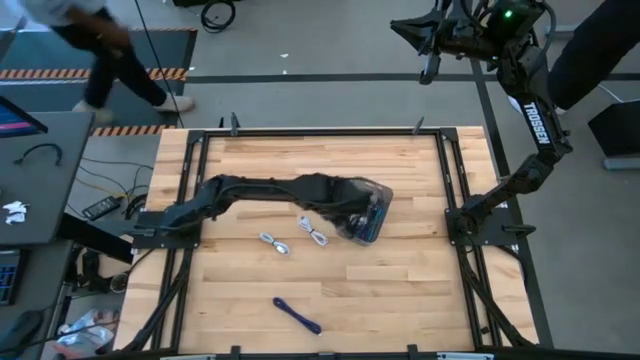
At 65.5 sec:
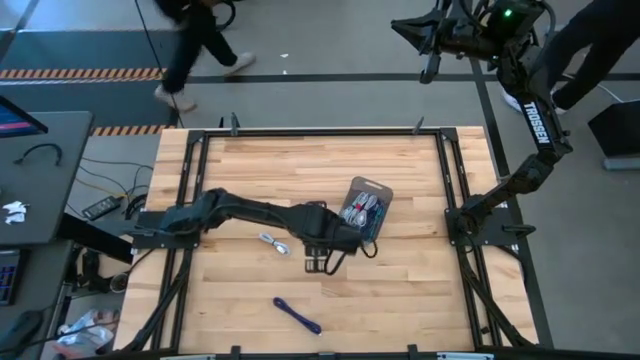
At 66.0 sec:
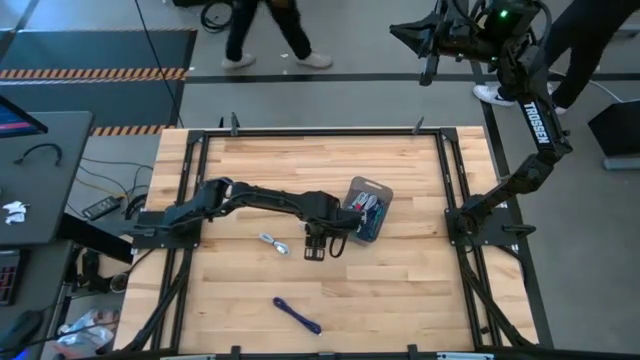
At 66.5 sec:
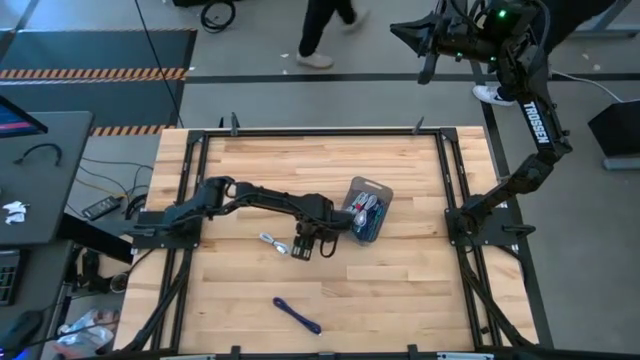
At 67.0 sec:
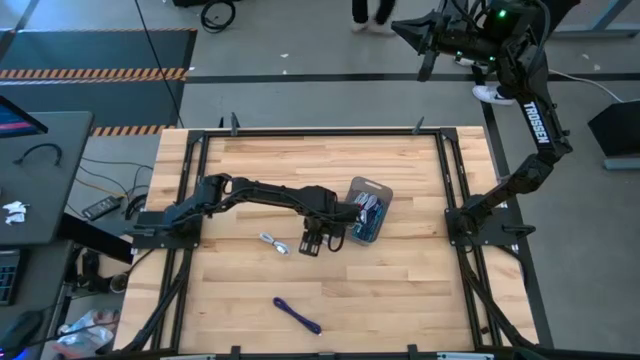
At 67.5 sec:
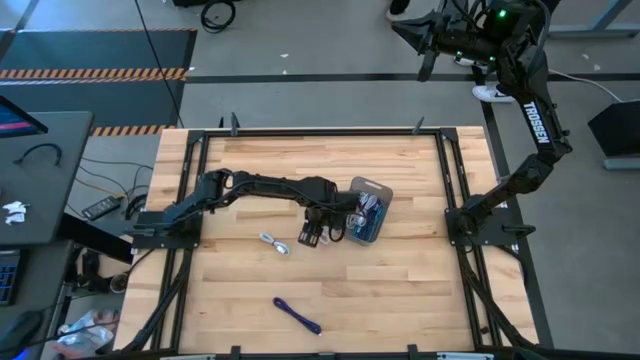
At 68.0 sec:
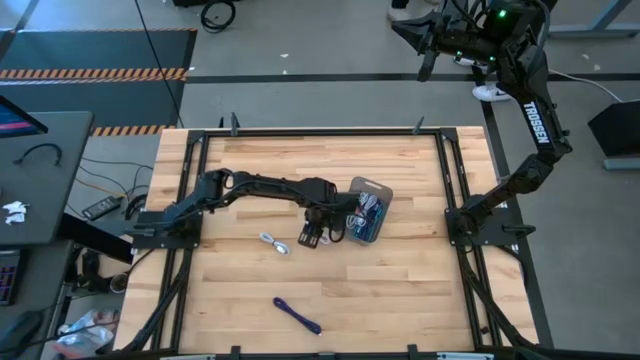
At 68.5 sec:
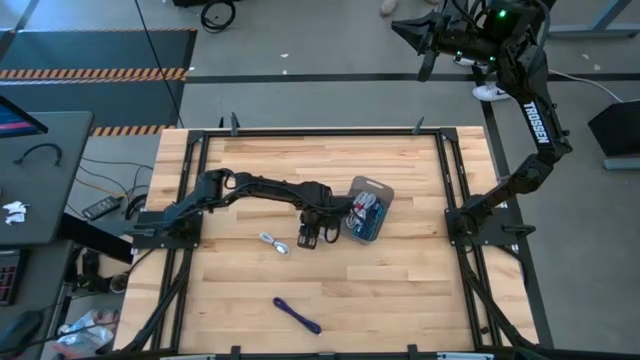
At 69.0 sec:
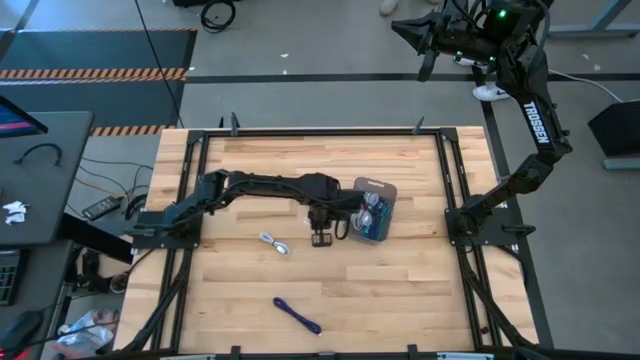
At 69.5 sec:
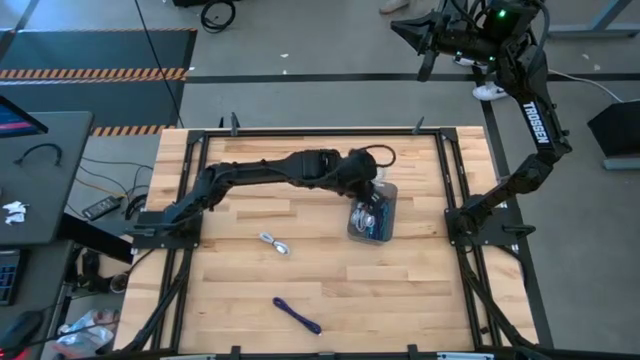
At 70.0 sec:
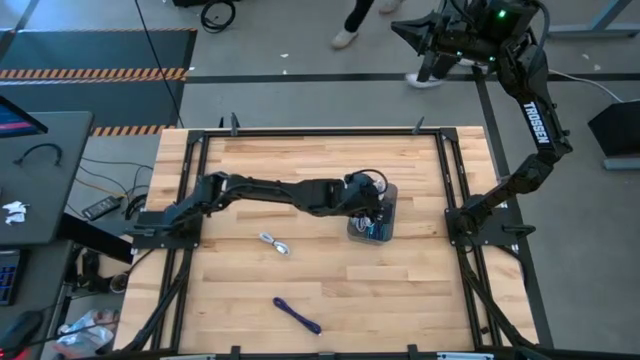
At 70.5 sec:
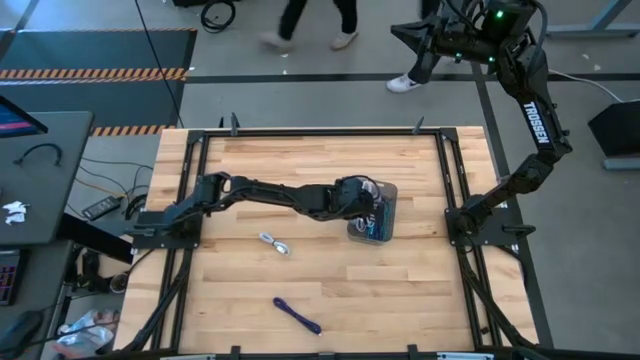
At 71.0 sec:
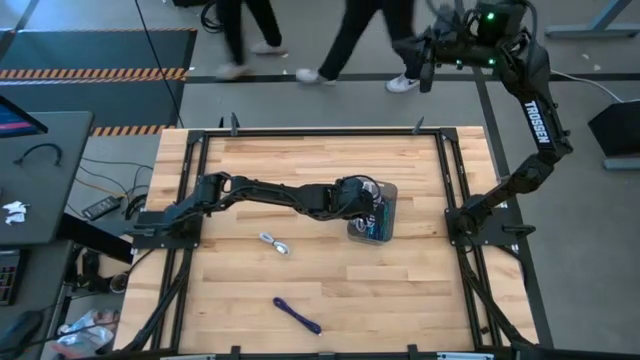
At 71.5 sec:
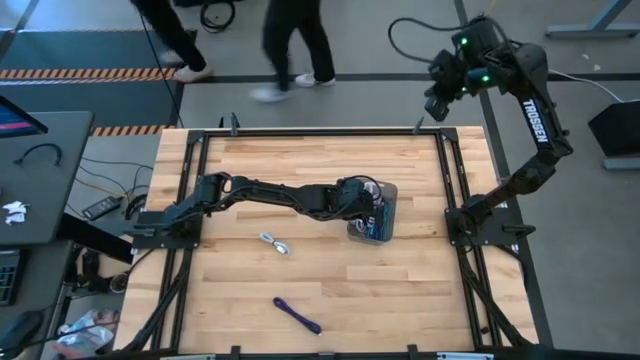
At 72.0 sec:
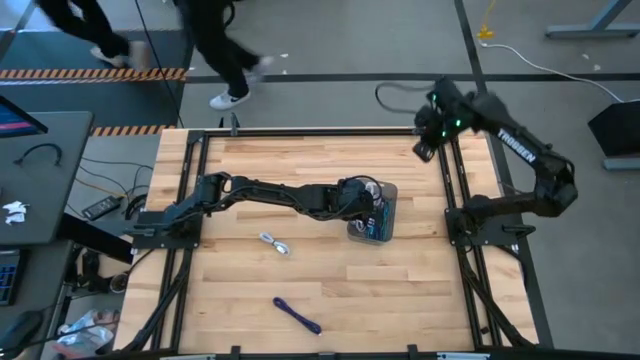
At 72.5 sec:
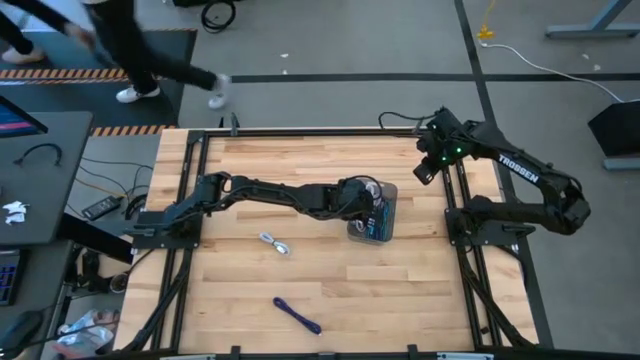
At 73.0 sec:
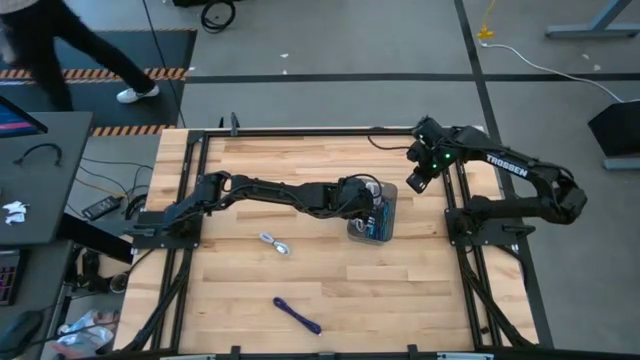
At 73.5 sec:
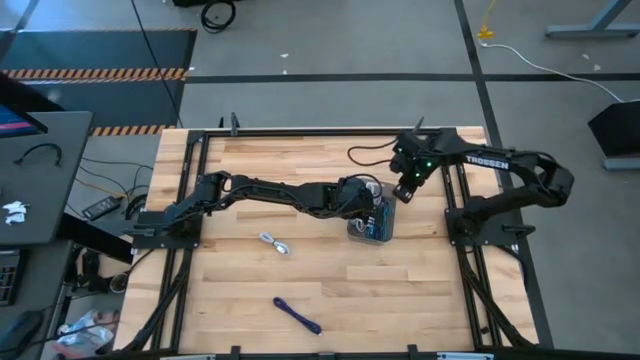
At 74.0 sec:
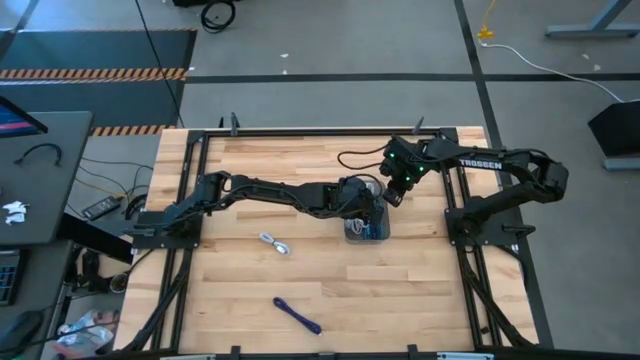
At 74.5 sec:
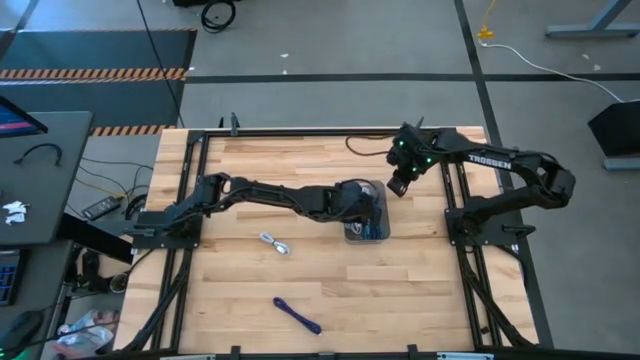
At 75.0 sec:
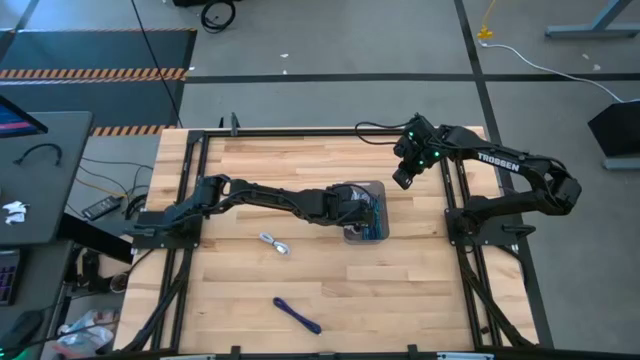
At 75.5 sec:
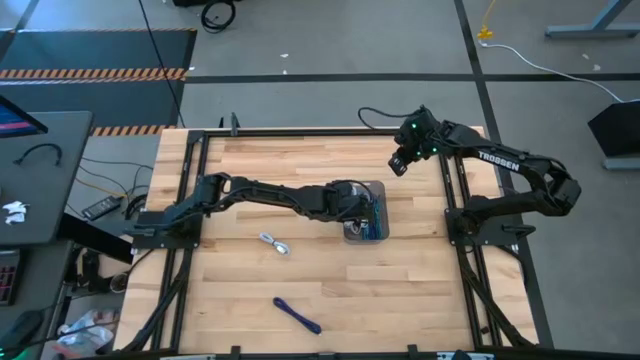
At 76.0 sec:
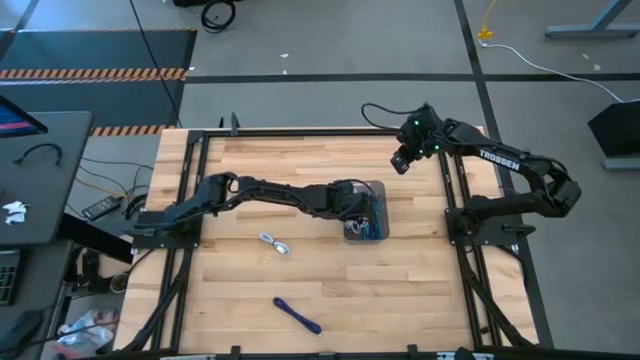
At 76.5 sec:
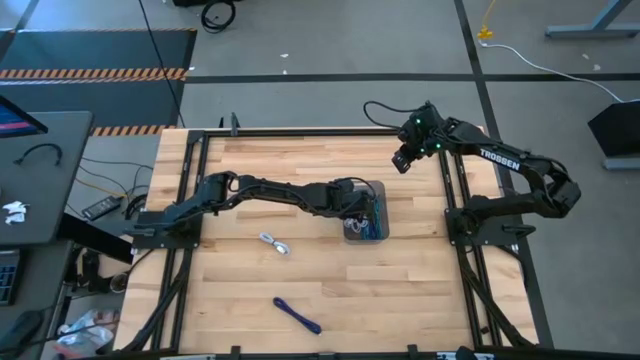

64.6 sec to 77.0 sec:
Task: Pick and place USB-C Cables
Put the white charger cable into the gray bin

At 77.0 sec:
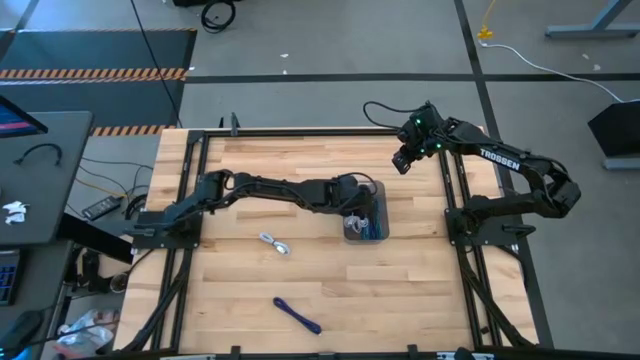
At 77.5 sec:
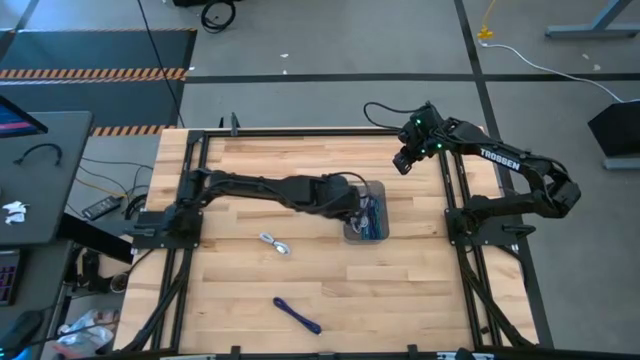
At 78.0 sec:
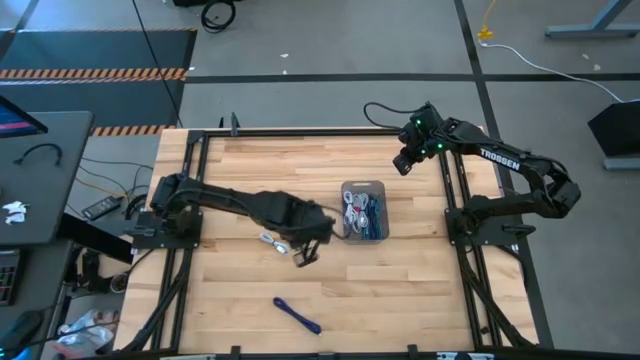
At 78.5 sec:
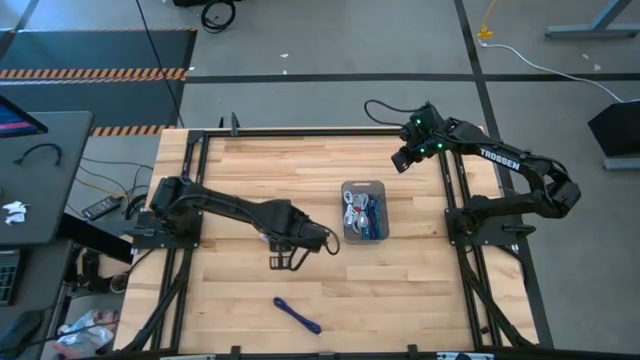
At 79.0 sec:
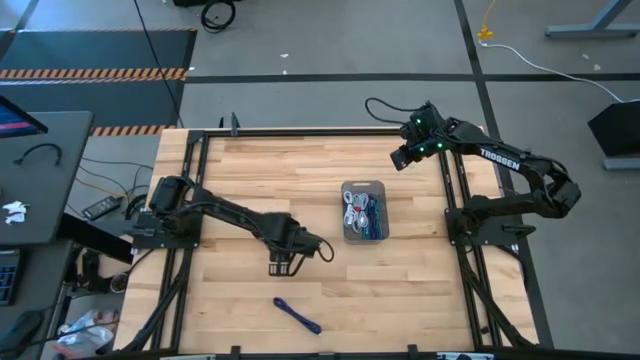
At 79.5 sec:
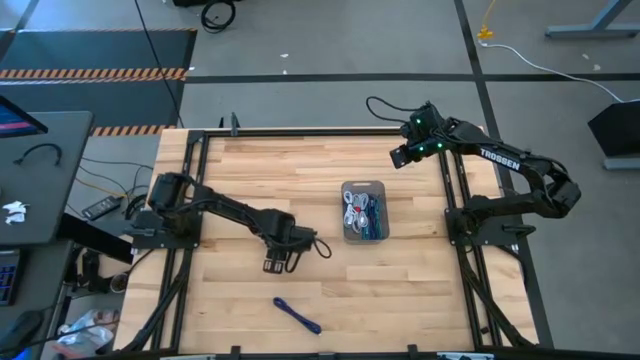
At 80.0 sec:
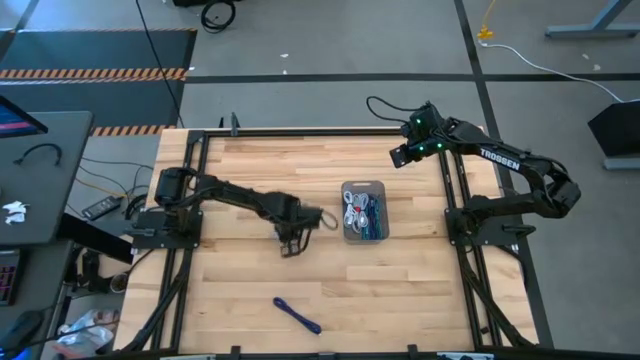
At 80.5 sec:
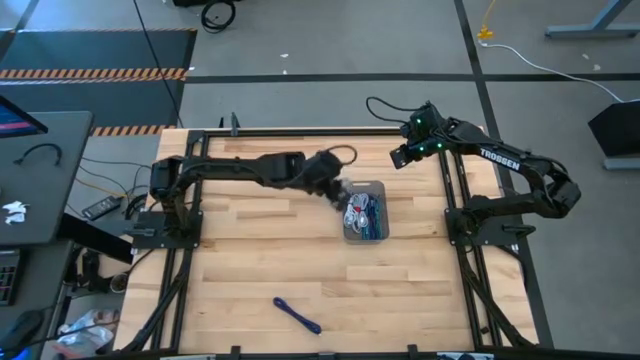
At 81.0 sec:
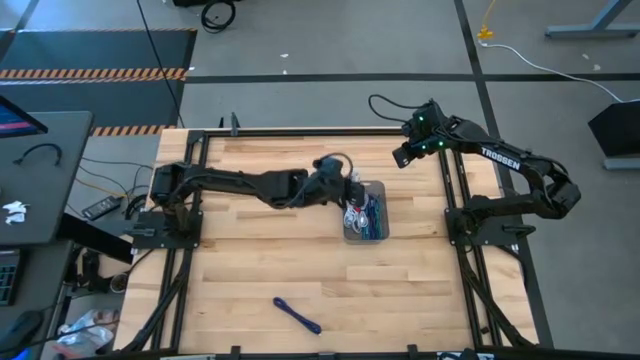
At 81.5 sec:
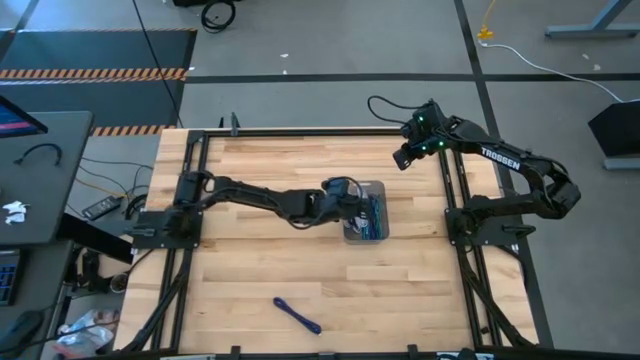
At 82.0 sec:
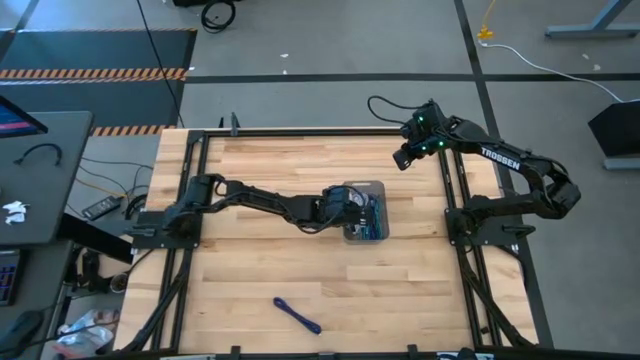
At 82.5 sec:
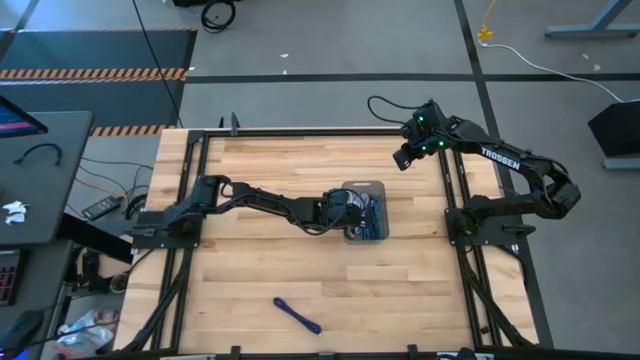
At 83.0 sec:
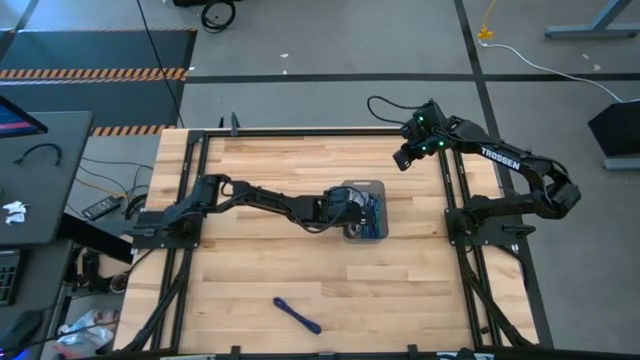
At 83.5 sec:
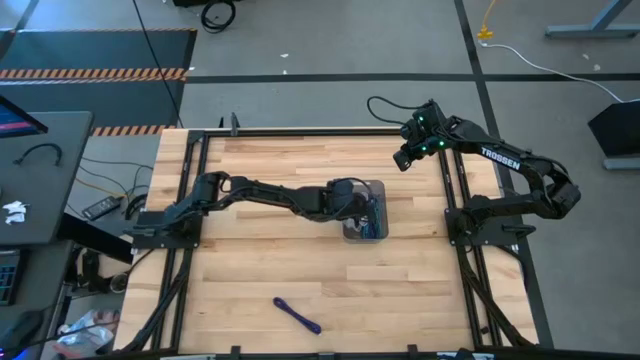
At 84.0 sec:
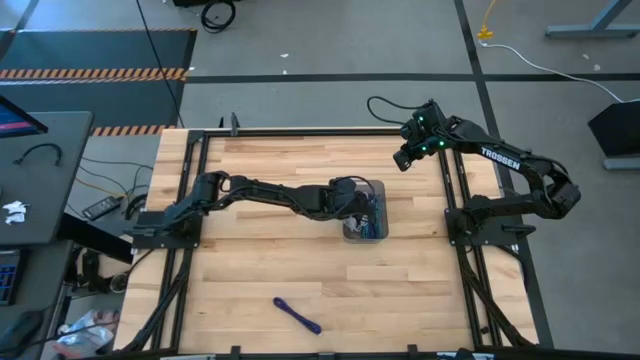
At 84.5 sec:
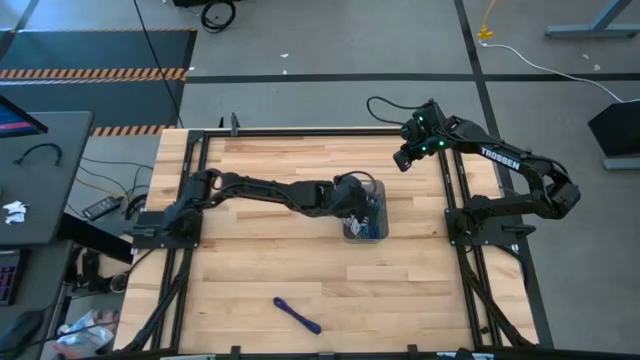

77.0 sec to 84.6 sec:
Put the light blue charger cable into the gray bin
